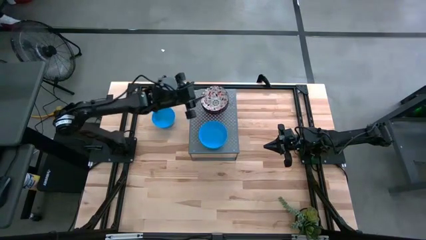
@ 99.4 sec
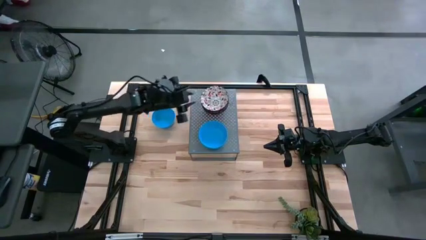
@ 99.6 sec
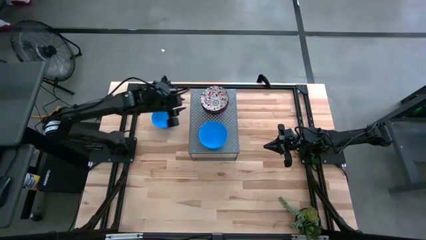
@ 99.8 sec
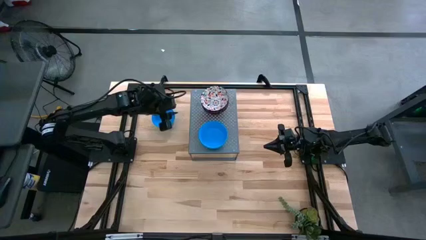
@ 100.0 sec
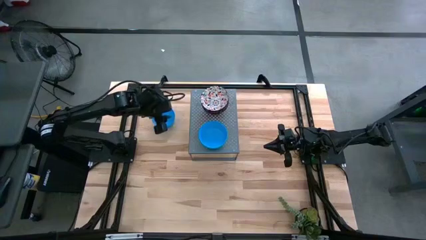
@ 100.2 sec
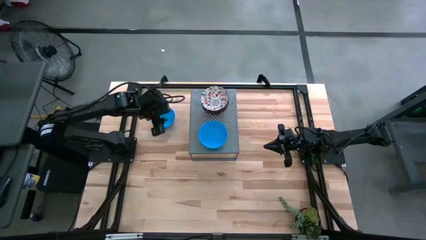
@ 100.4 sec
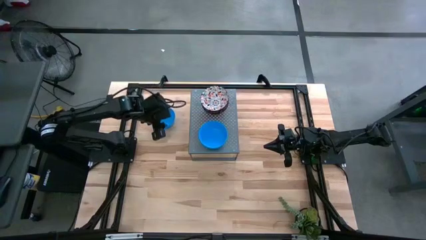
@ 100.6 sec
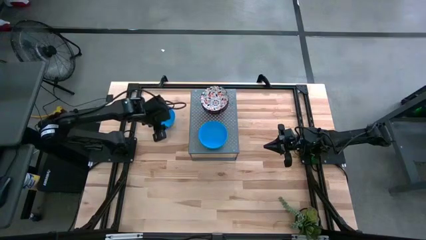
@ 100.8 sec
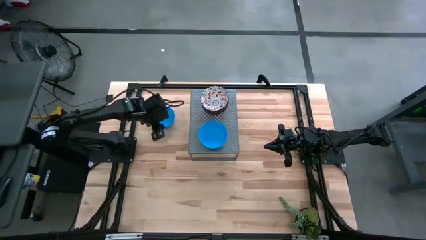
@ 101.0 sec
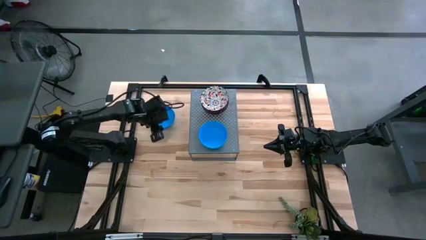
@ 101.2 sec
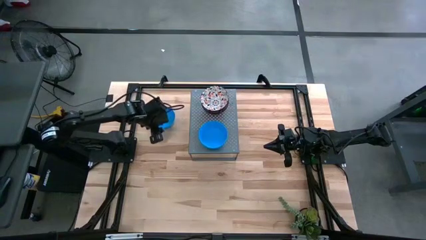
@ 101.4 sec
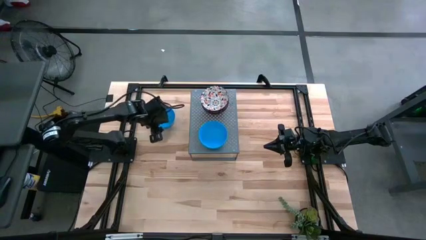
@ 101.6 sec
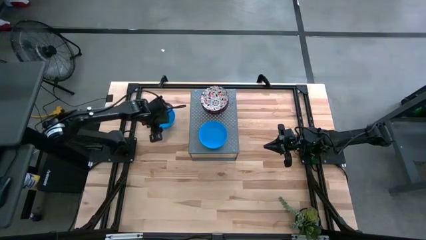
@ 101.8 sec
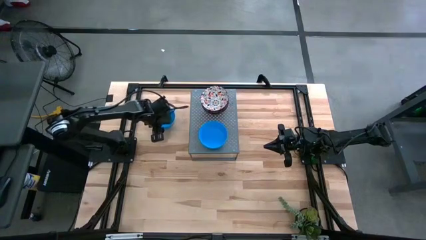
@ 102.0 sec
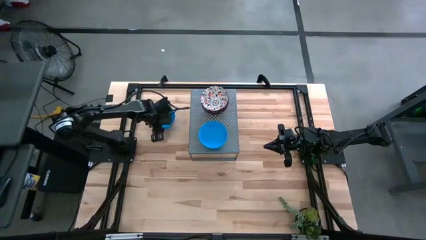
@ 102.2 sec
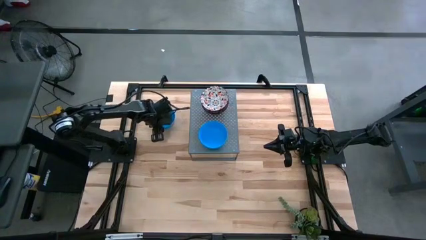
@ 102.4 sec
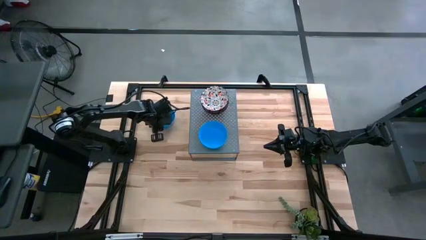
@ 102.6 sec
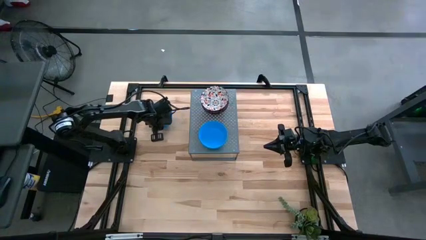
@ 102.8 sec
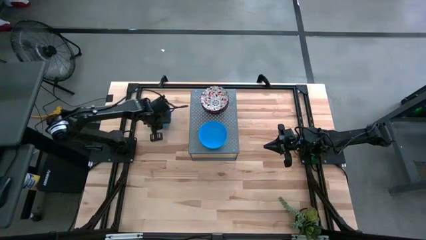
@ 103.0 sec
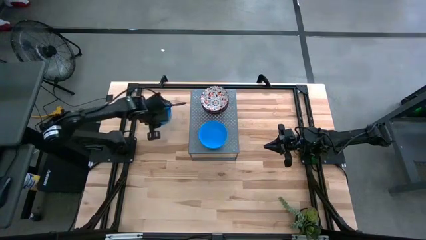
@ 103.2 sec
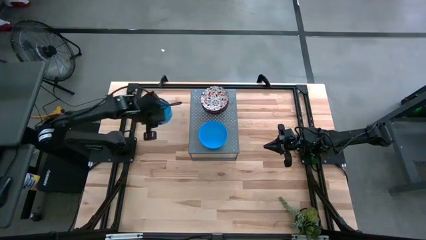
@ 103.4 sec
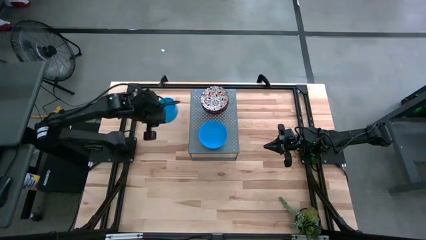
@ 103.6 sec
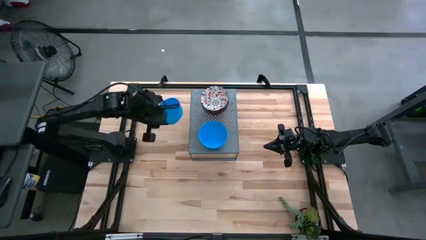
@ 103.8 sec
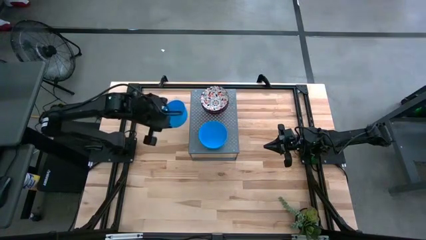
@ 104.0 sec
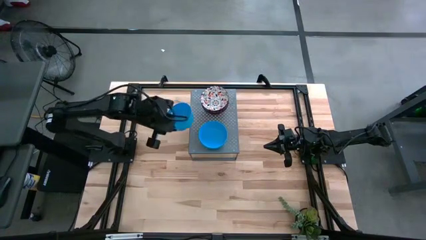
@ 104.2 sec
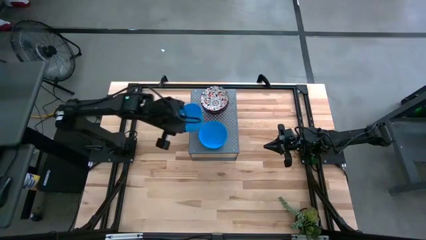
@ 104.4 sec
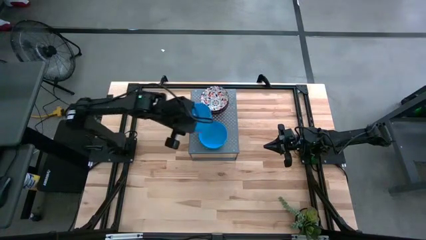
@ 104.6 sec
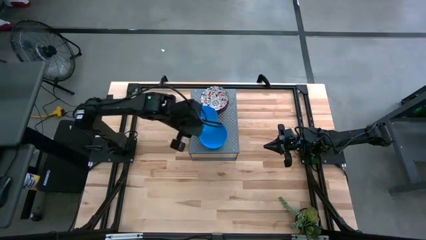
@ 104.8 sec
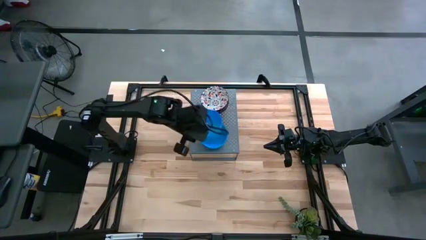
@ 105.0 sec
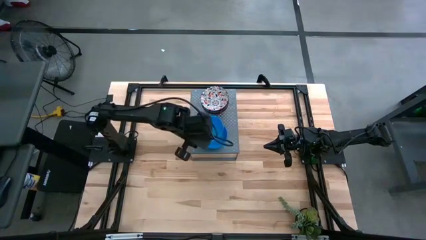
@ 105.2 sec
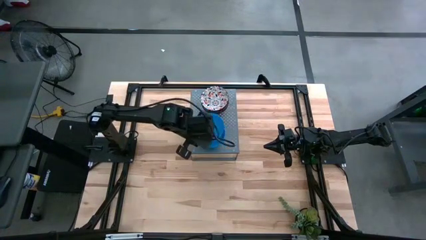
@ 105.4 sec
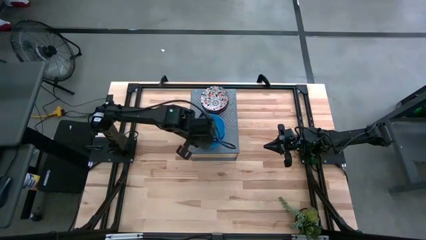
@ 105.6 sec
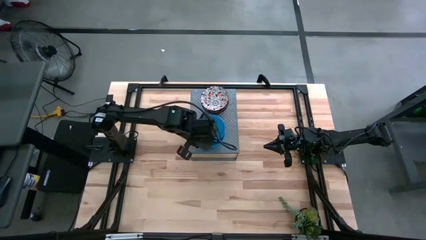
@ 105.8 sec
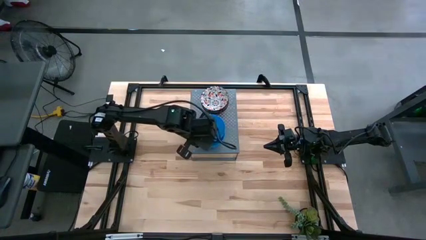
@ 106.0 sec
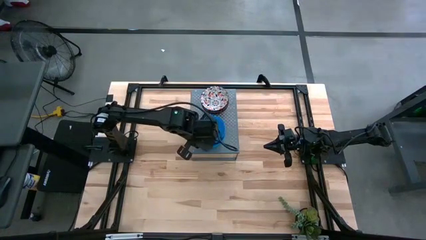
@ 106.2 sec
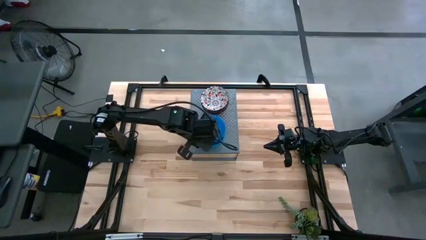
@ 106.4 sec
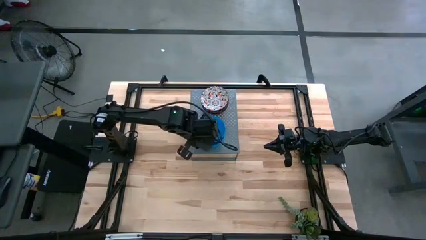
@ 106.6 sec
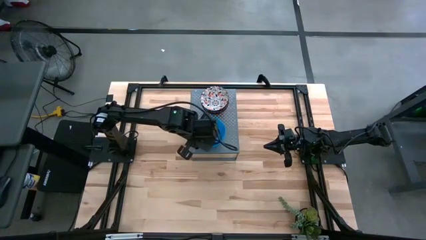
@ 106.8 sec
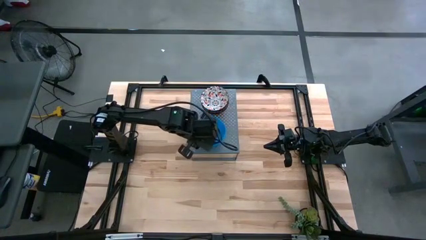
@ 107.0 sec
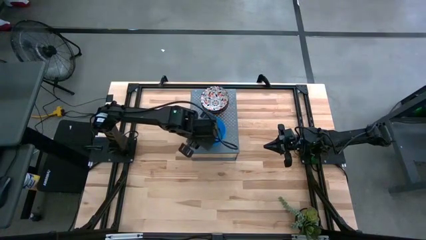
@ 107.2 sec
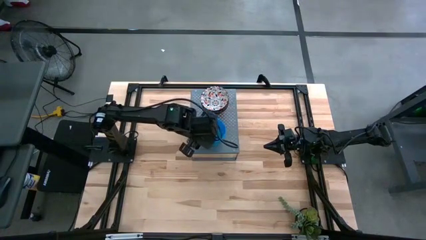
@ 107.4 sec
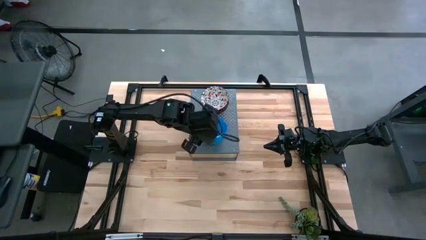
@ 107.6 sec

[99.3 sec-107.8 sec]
Task: Pick & Place Mini bowls
Stack the blue bowl on the blue bowls on the shelf

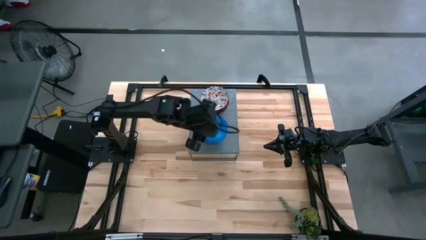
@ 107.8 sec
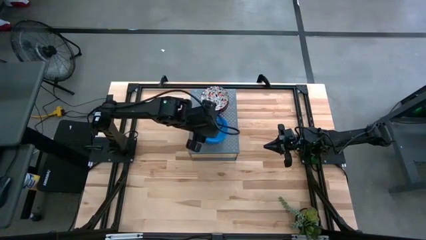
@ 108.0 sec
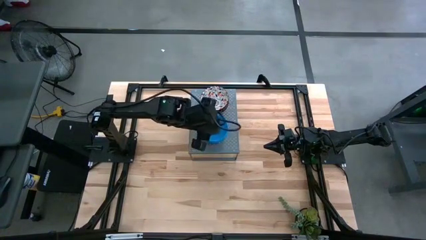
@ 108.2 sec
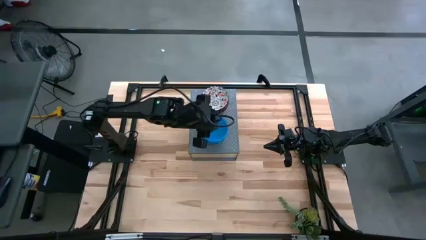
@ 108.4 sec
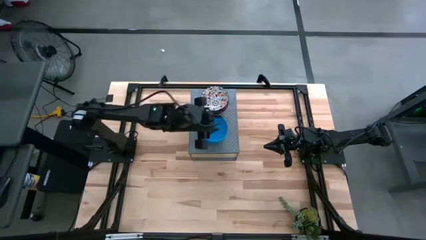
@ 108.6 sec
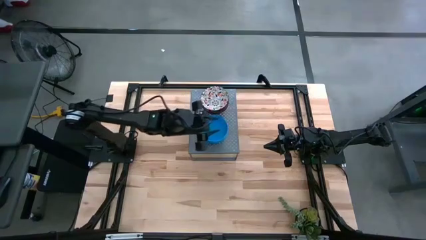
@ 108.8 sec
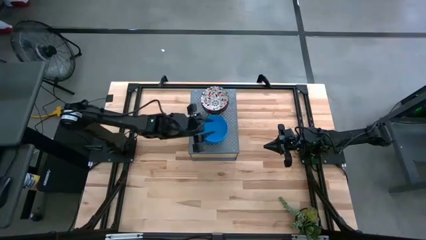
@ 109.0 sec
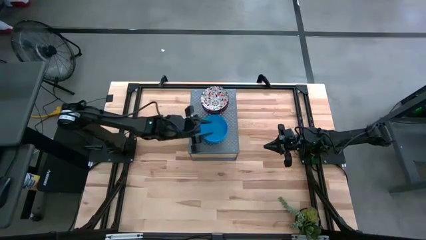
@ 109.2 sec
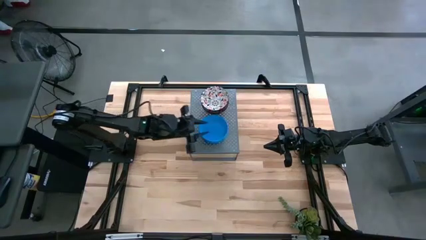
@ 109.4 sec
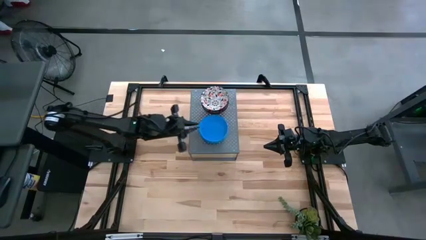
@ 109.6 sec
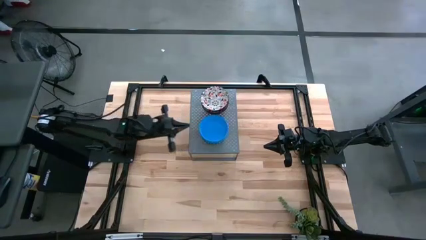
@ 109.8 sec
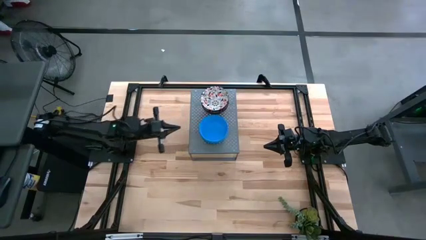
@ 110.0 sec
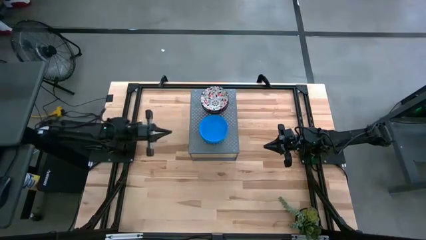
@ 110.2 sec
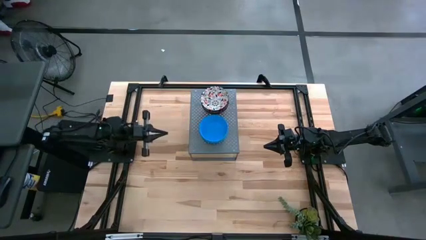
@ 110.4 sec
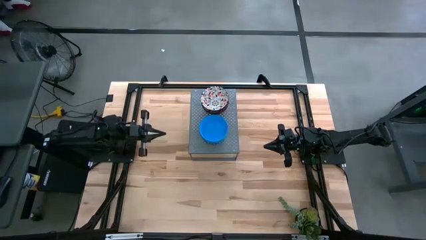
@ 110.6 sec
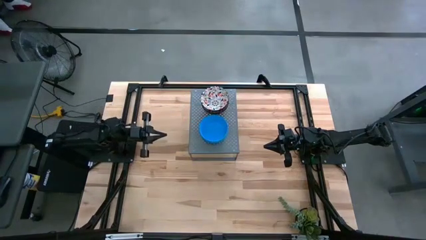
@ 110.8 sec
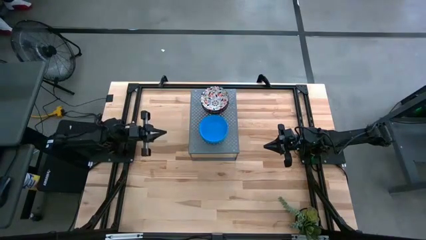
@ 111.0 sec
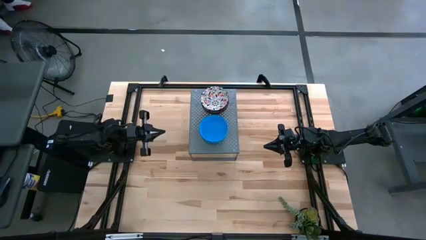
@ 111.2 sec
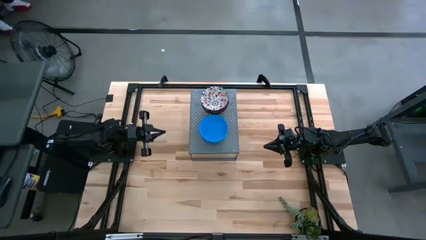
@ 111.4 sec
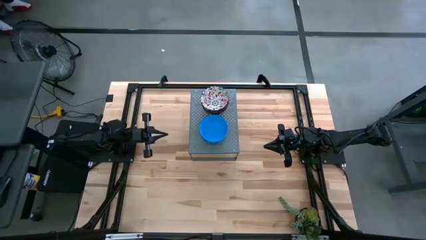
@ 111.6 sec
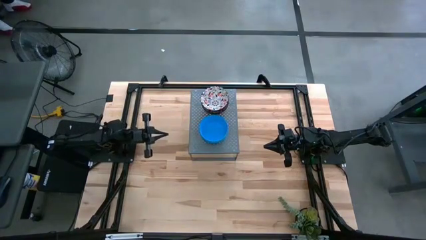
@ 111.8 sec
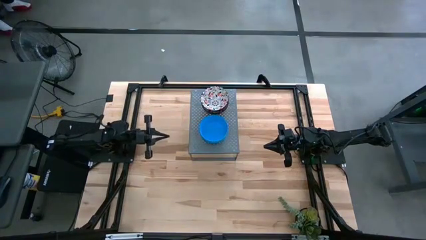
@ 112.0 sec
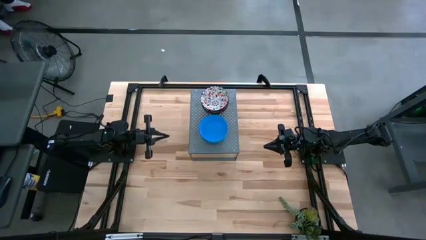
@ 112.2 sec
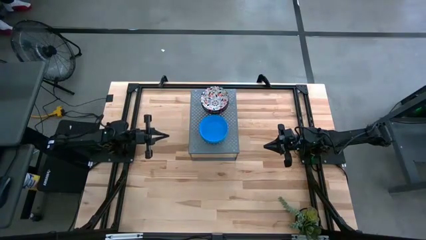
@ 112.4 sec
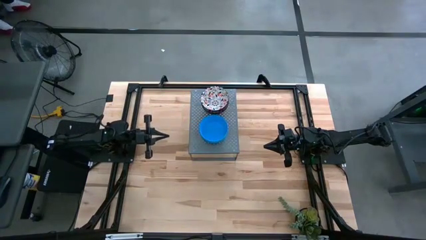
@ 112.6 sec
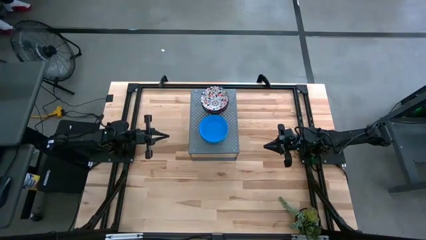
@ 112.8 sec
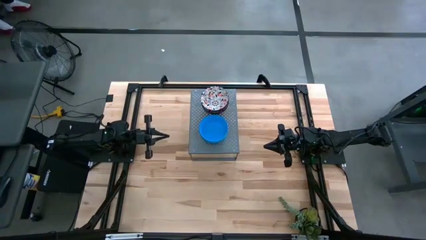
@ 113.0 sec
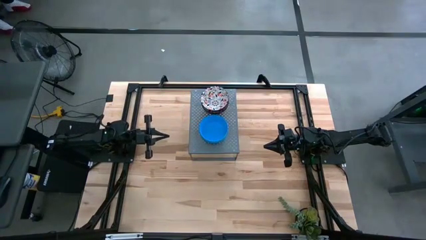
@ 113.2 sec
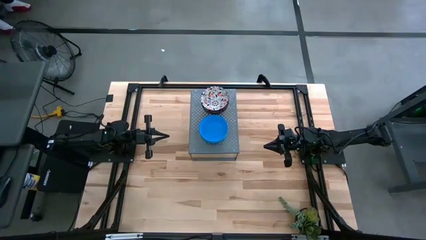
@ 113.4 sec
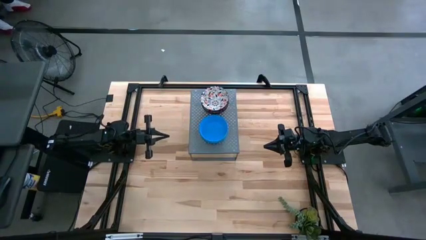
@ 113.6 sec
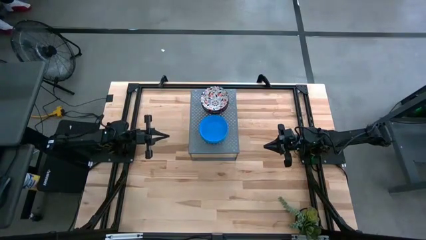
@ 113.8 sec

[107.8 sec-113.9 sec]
Return to Home Position

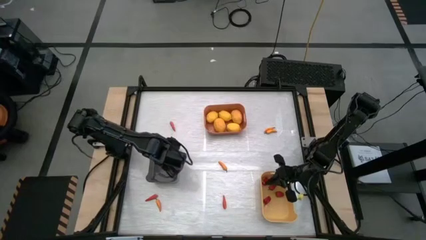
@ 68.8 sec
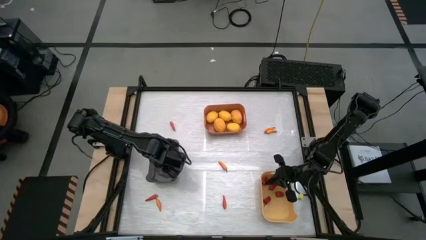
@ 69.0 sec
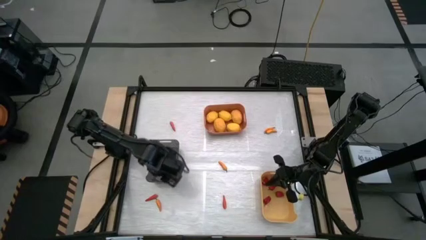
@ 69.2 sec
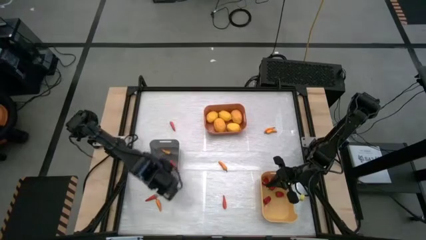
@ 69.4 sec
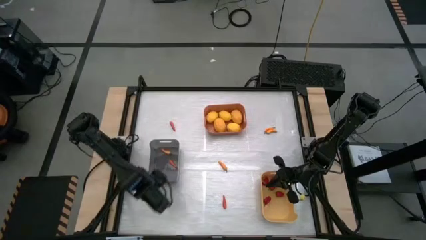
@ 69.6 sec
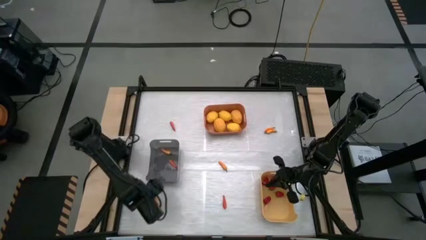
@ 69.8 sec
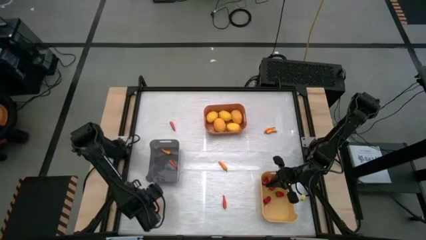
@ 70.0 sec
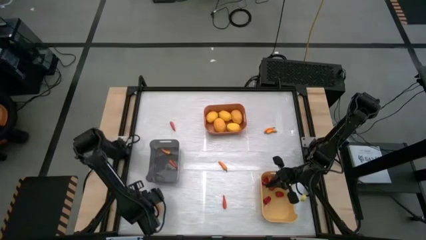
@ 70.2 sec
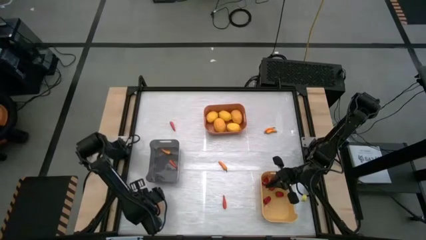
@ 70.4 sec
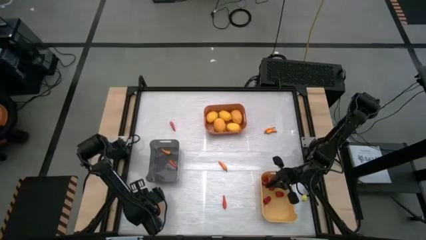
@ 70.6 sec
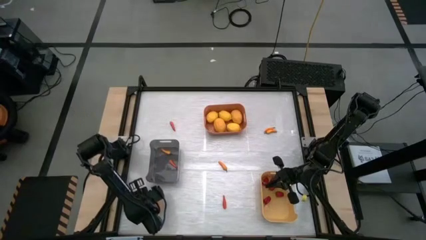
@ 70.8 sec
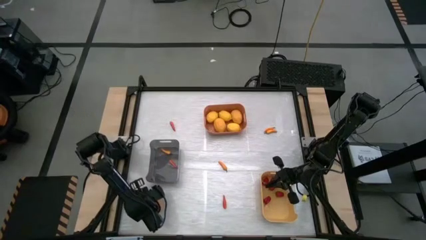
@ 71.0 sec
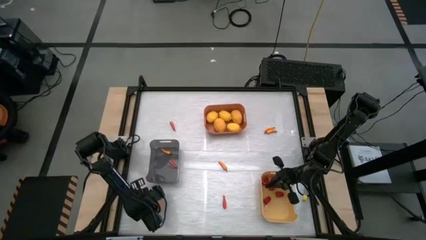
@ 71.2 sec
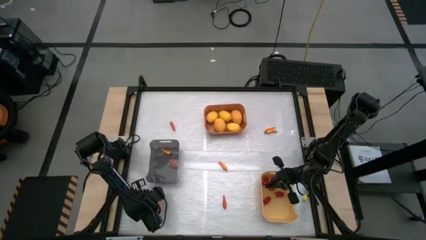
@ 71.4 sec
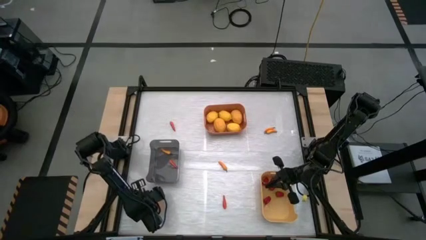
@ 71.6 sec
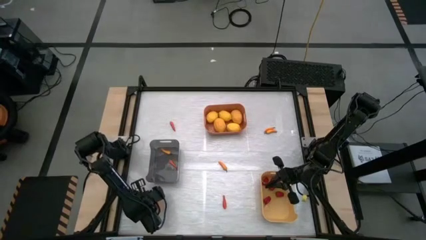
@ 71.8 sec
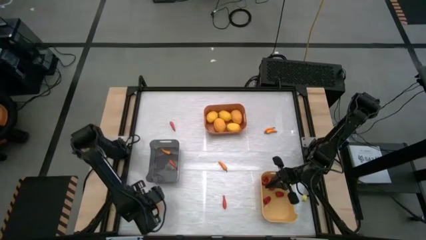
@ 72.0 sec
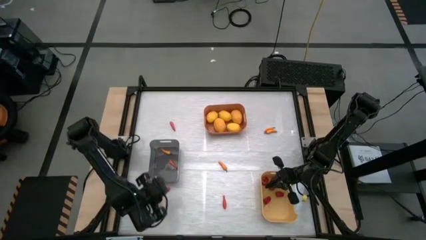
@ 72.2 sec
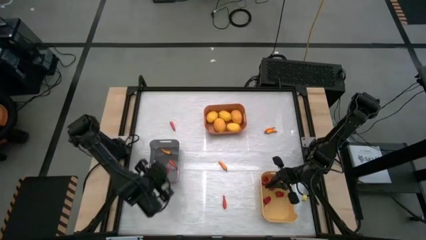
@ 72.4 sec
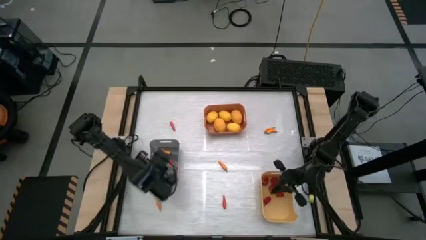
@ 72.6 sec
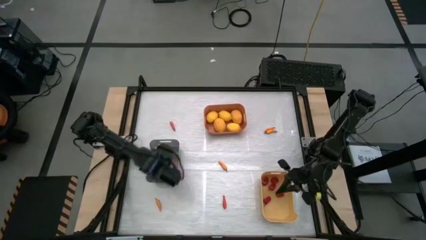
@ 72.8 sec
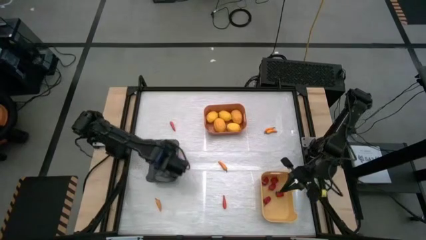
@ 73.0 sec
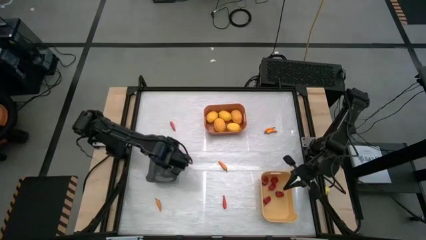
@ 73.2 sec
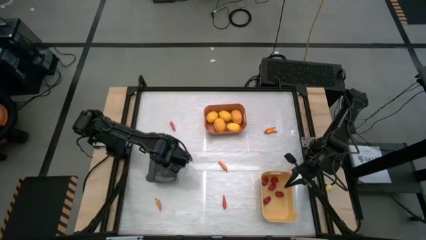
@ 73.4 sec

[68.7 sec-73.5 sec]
Task: Sort produce into baskets
Put the orange chili pepper into the black bin
